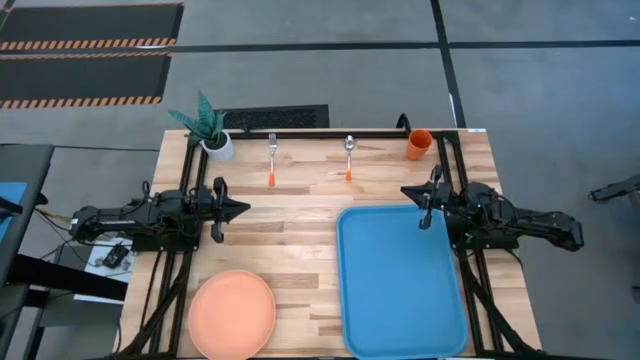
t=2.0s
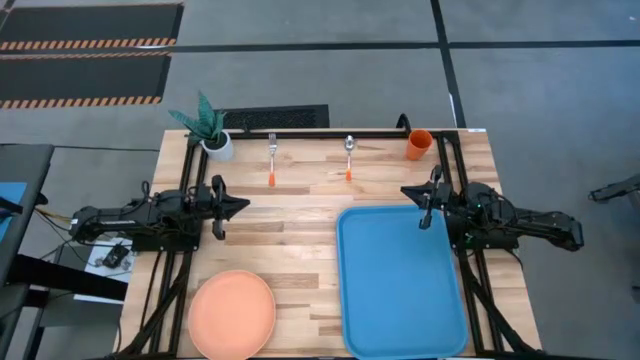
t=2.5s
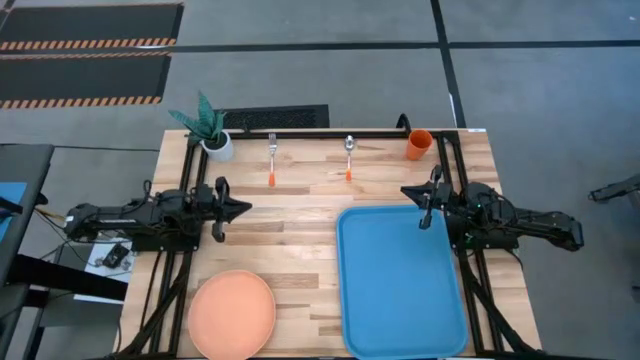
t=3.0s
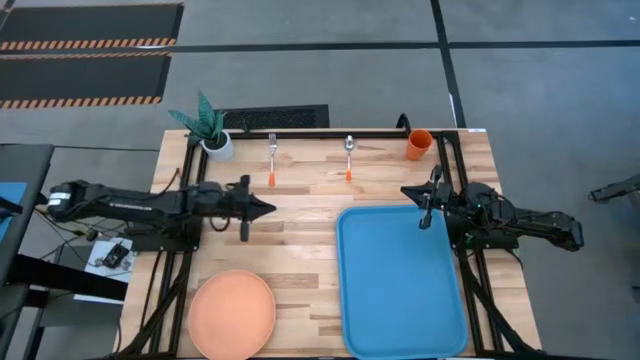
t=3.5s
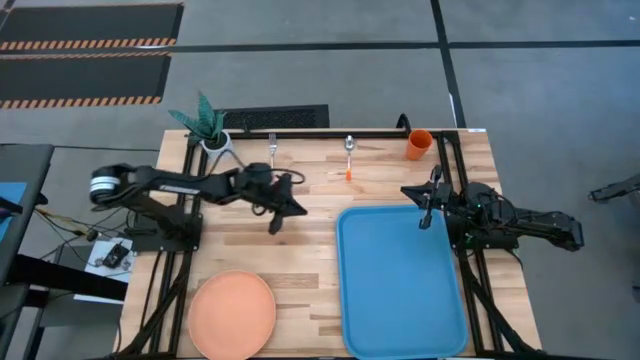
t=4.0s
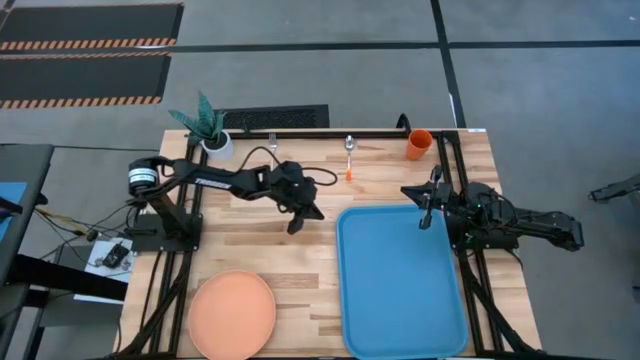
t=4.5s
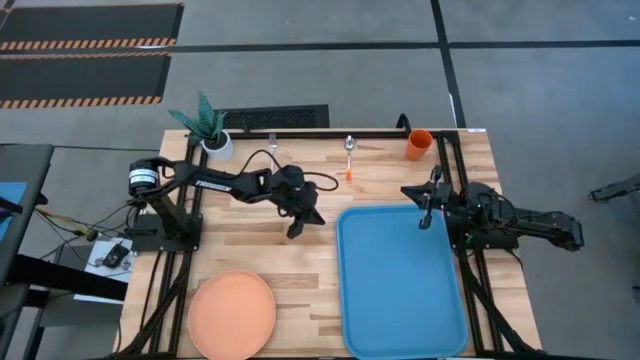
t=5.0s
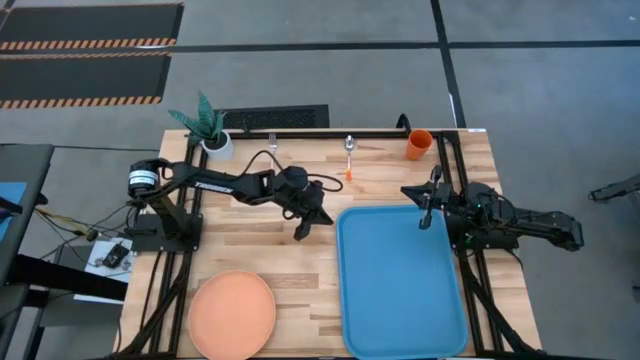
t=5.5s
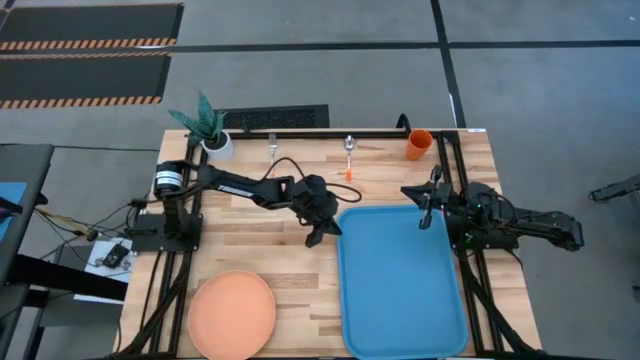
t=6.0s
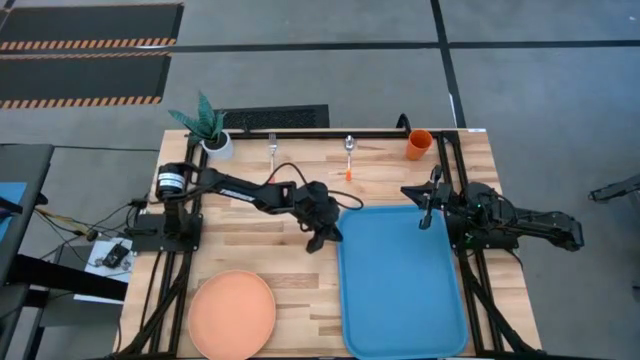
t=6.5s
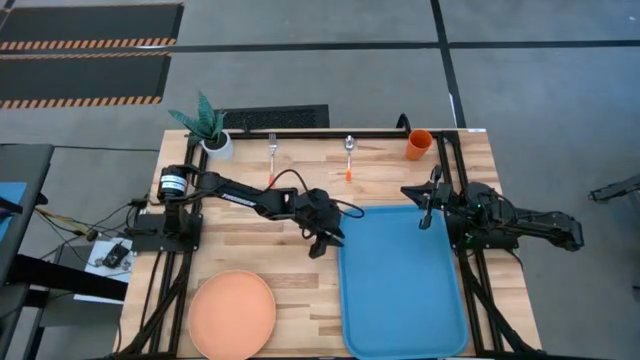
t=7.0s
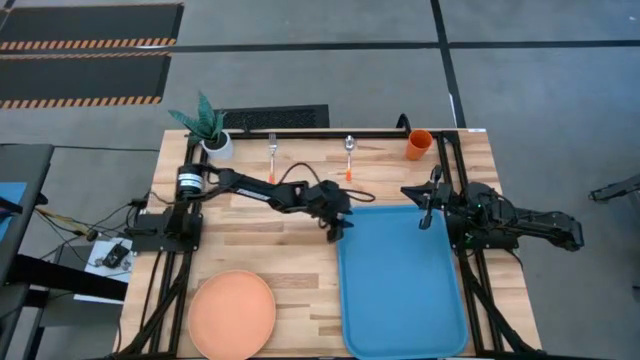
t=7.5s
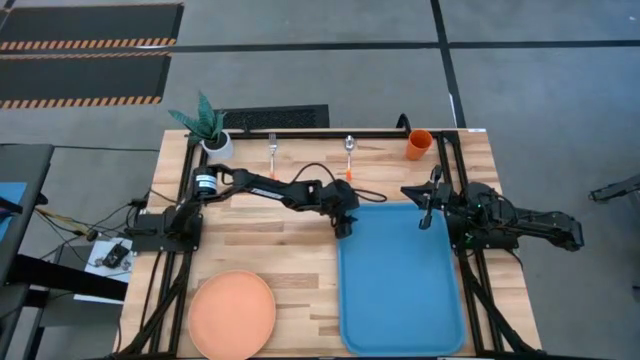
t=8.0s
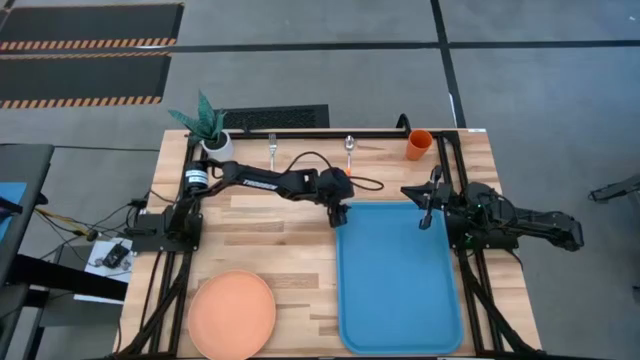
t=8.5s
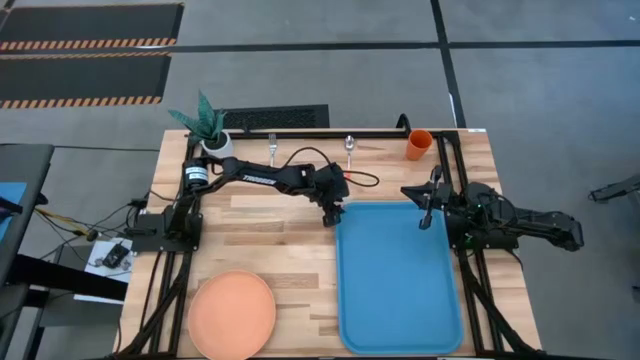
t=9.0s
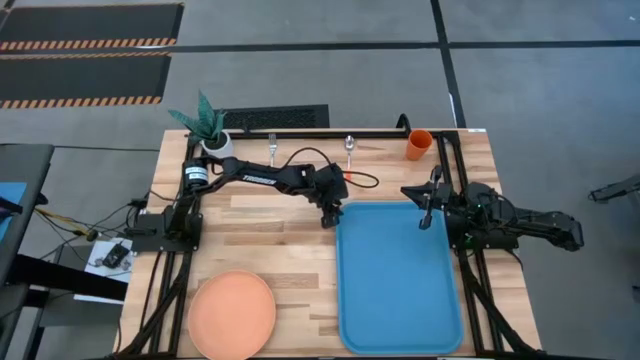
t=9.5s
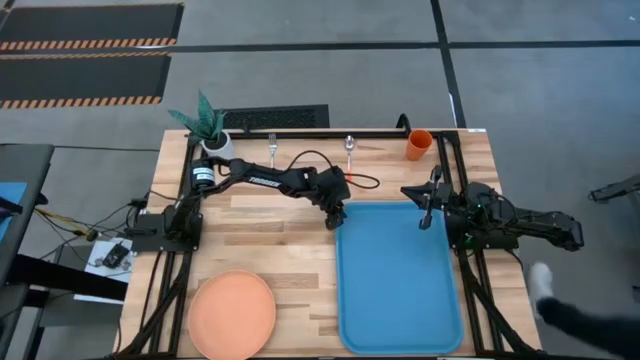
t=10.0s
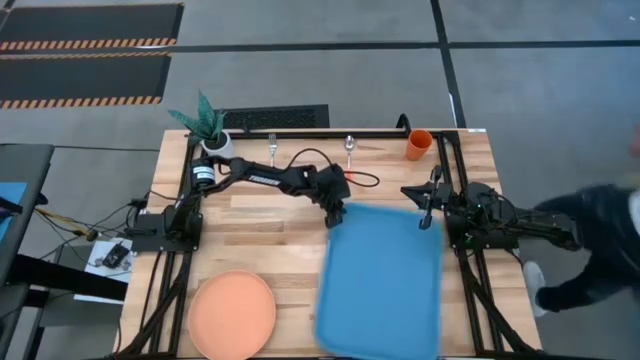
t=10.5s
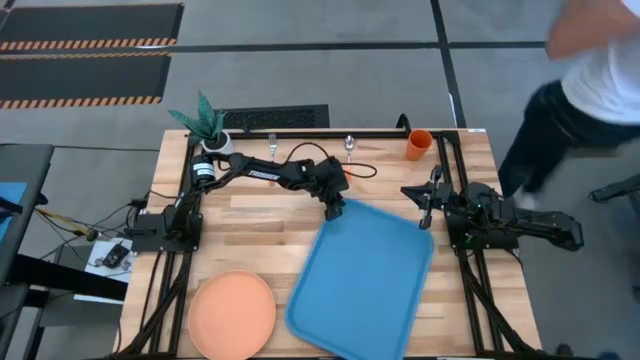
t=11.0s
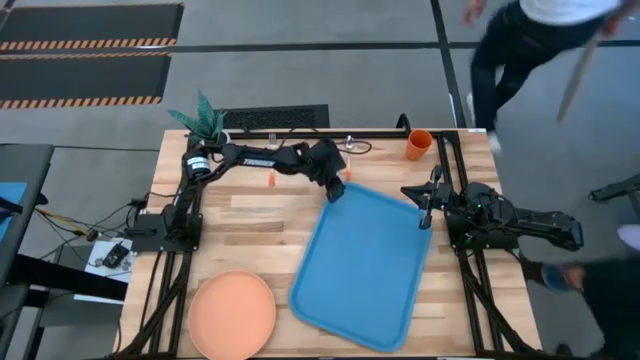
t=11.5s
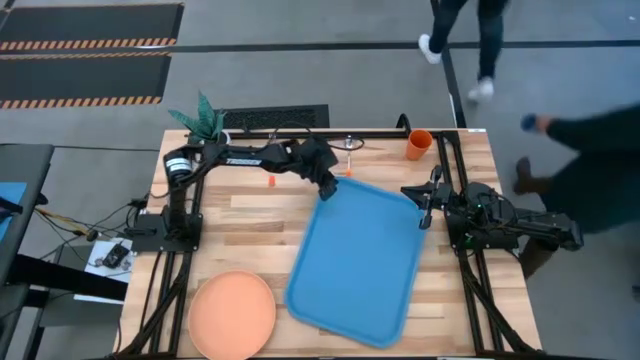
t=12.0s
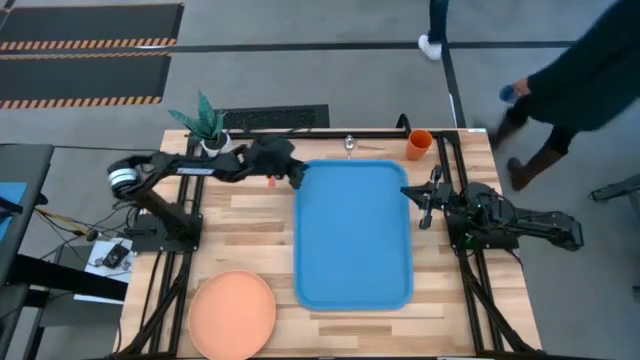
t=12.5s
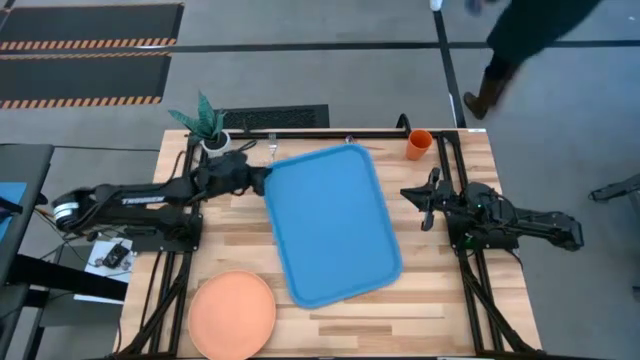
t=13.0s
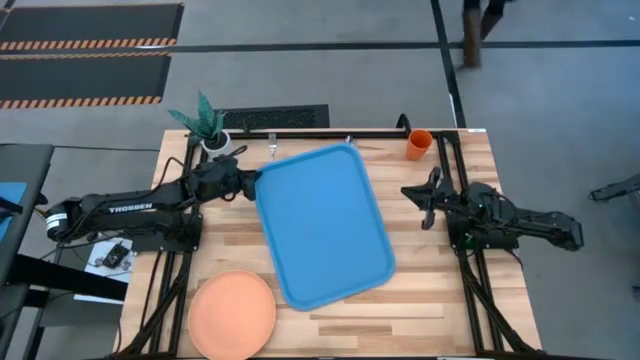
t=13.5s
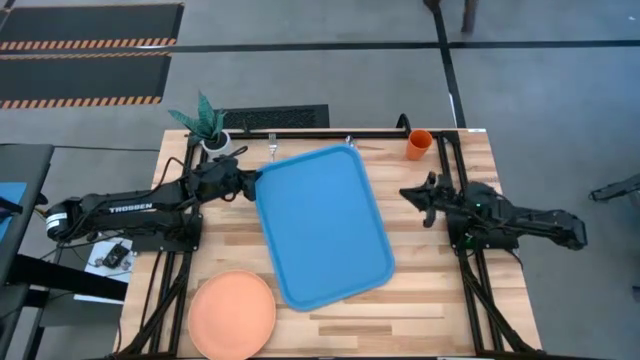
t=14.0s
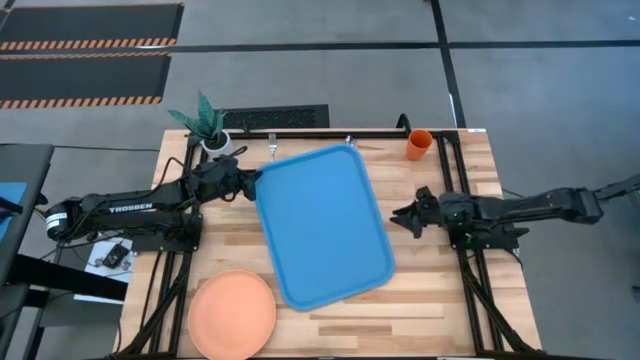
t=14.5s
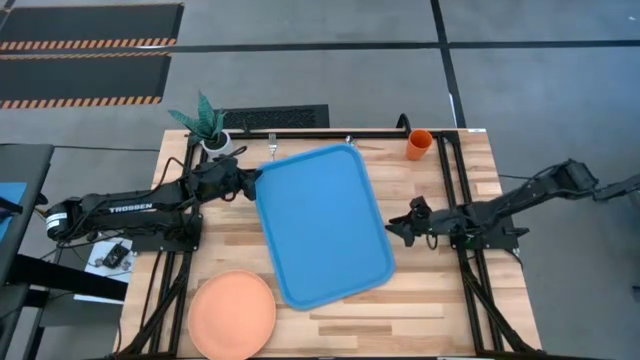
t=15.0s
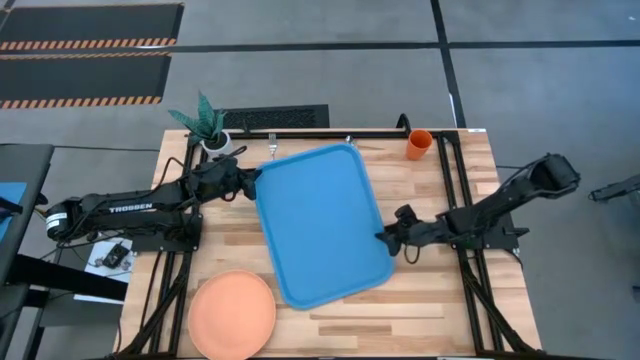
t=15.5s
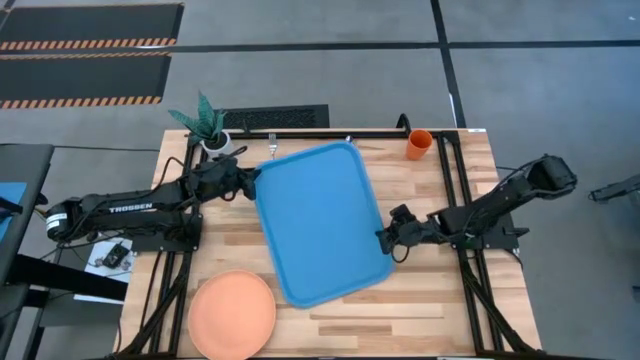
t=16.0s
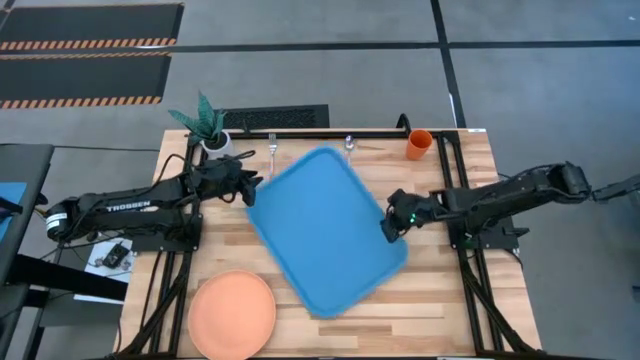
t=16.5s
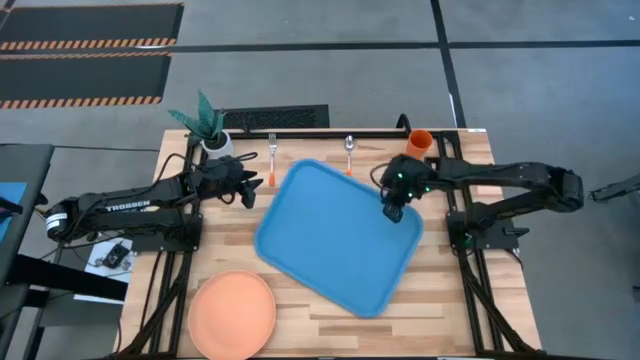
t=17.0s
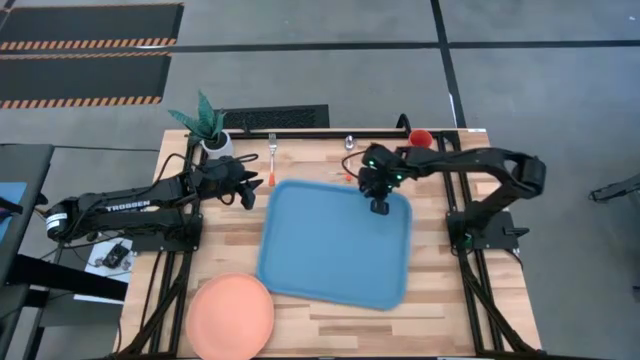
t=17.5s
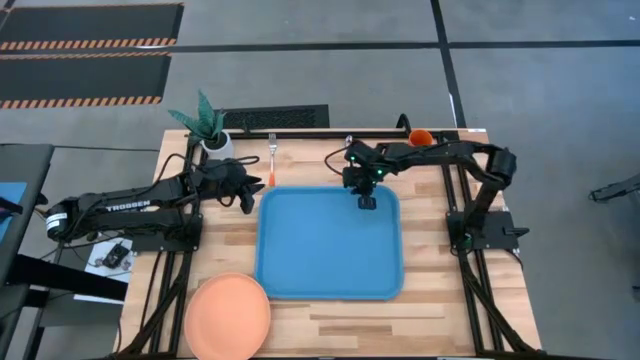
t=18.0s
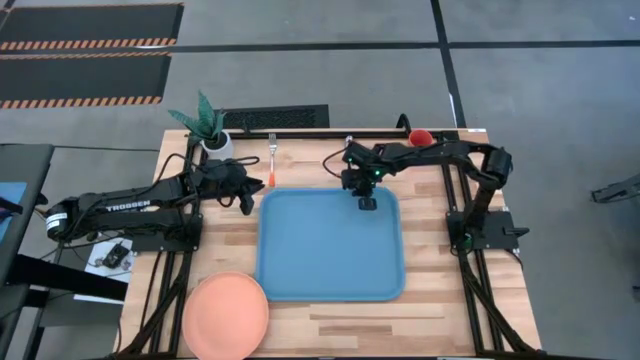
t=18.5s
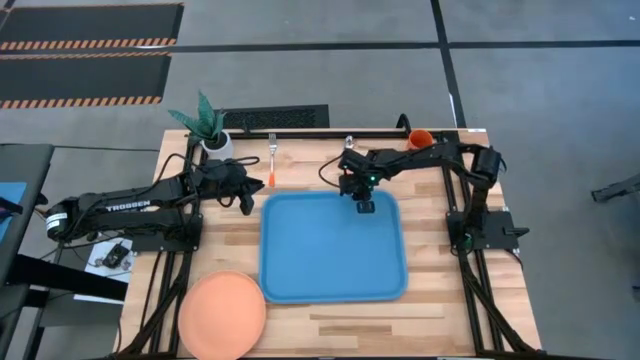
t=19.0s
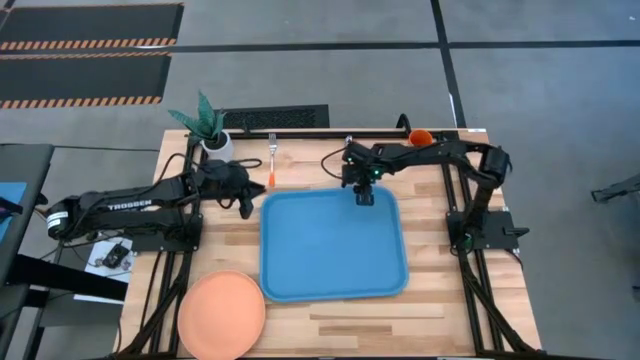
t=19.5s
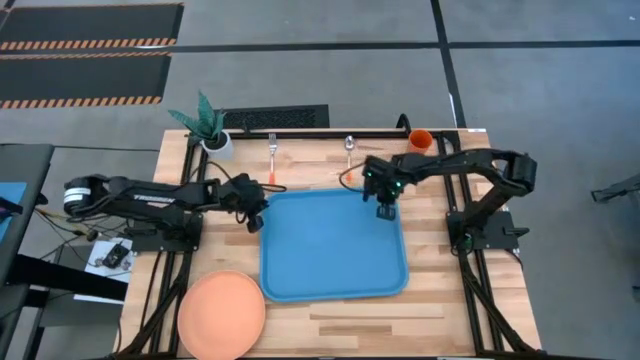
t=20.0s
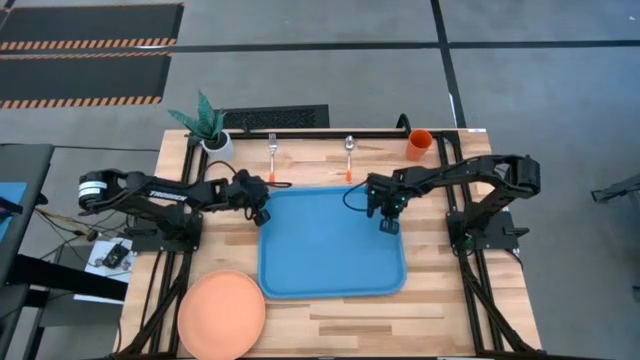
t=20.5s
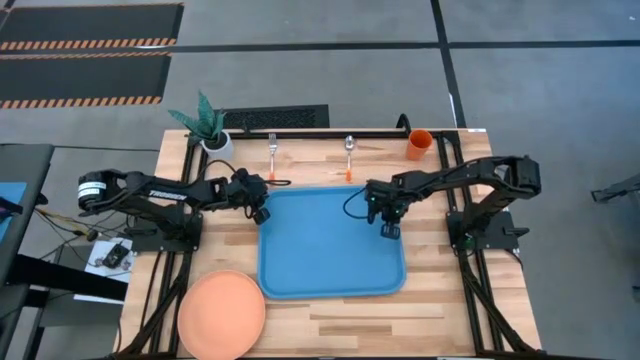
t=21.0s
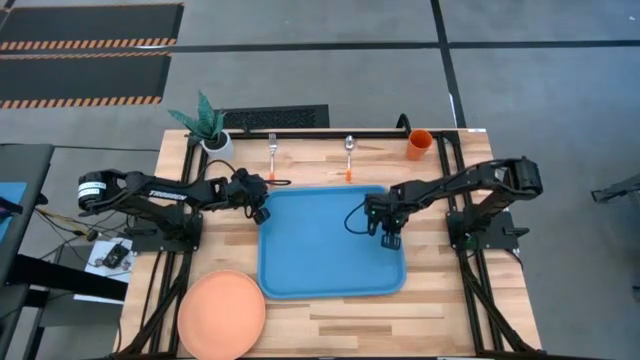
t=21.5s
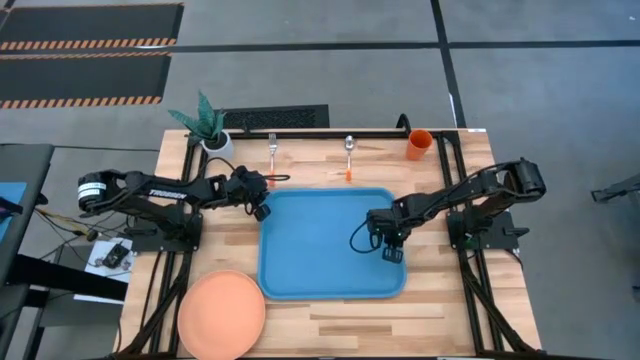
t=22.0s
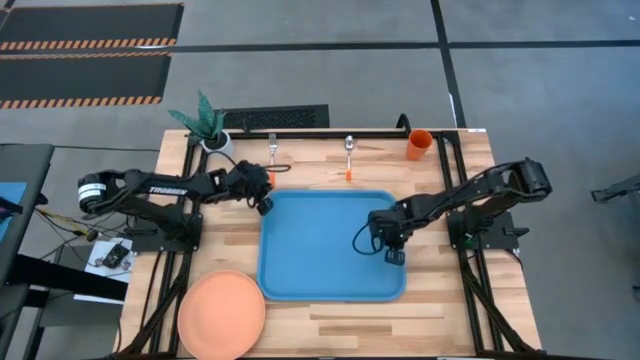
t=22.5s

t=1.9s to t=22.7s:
Task: Pick and place plate/cup/fork/spoon on tray
Move the blue serving tray to the center of the table
